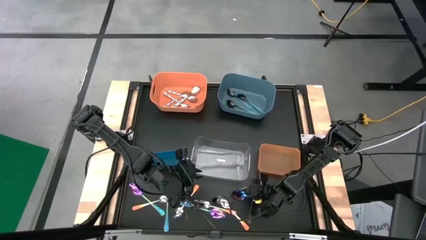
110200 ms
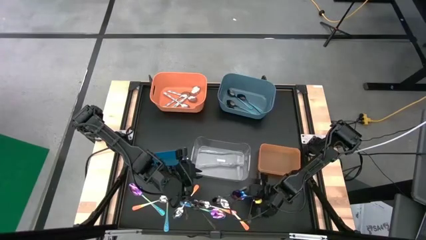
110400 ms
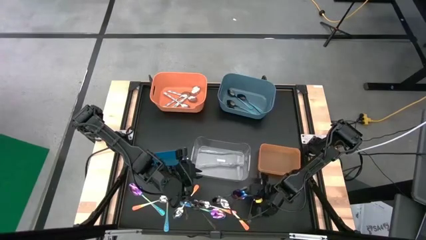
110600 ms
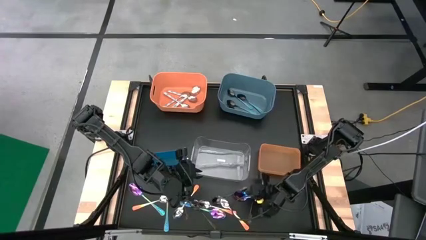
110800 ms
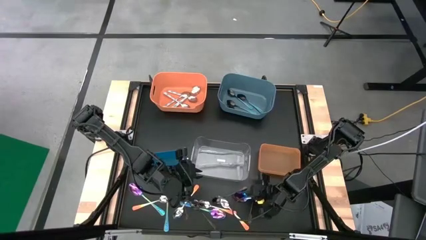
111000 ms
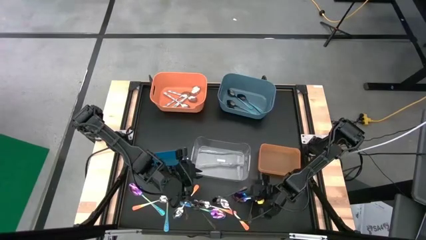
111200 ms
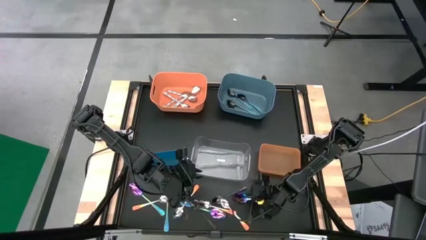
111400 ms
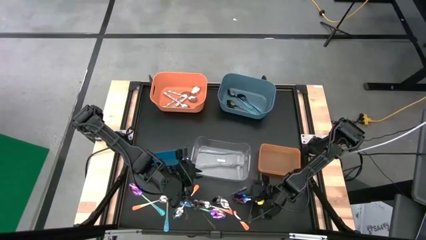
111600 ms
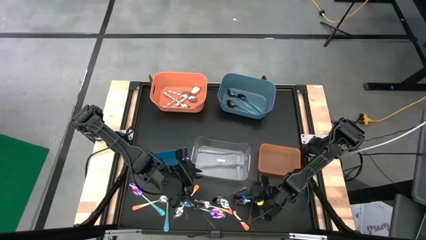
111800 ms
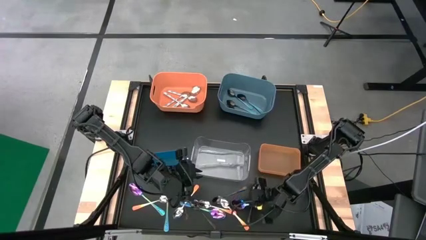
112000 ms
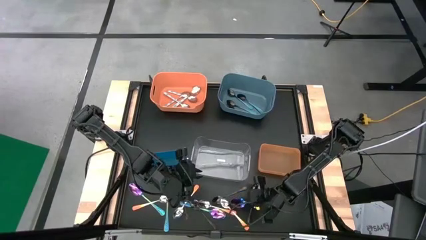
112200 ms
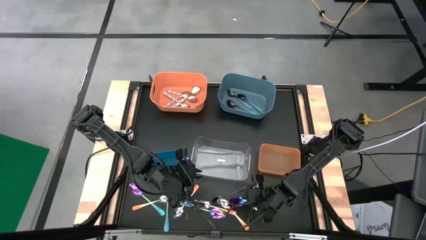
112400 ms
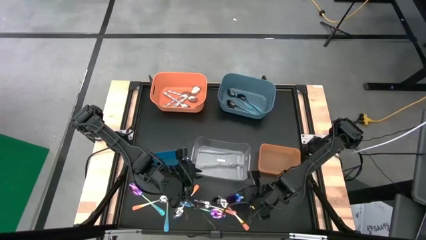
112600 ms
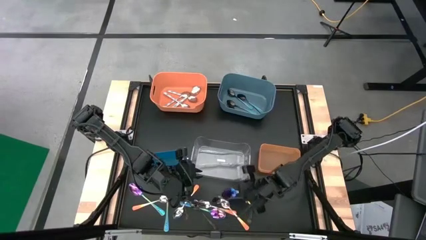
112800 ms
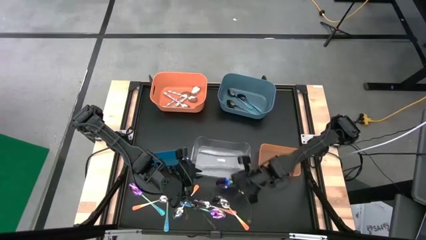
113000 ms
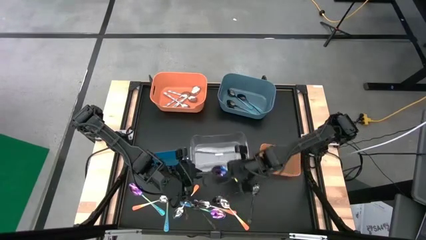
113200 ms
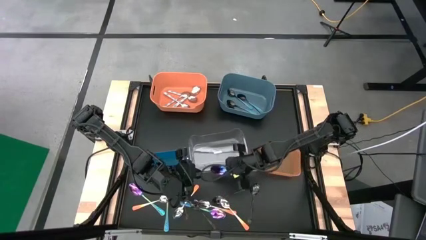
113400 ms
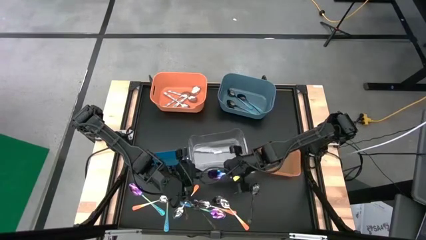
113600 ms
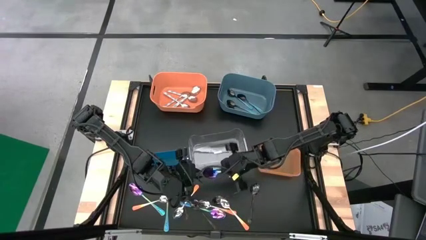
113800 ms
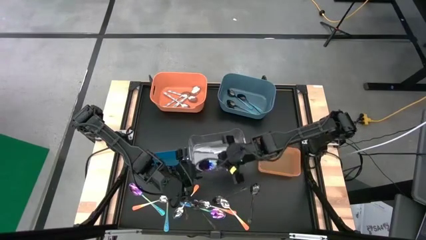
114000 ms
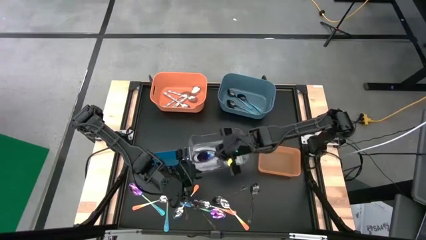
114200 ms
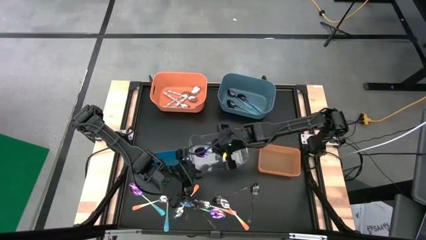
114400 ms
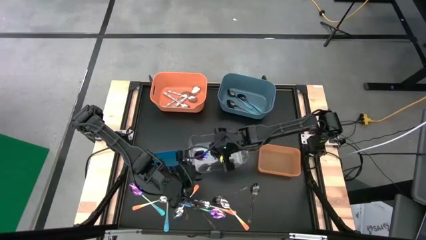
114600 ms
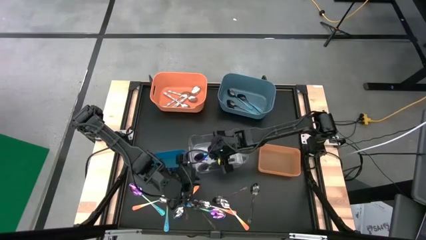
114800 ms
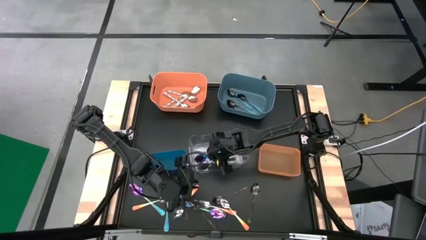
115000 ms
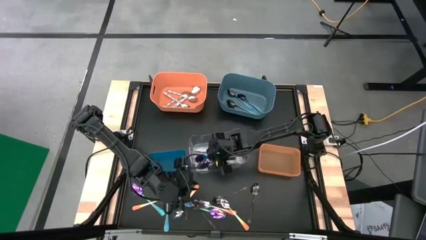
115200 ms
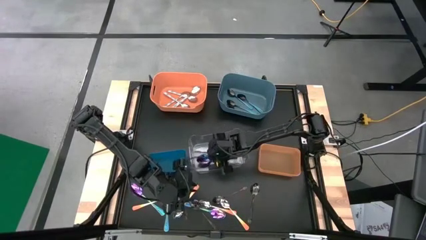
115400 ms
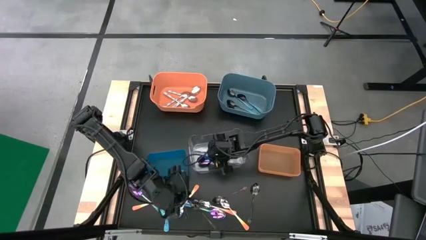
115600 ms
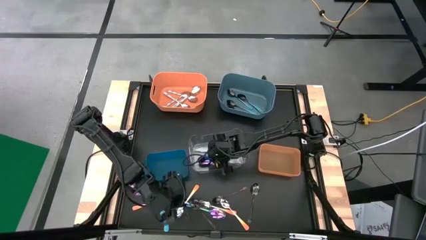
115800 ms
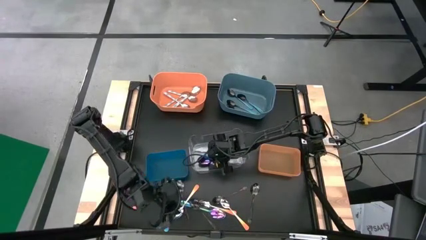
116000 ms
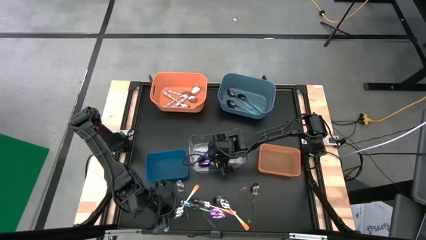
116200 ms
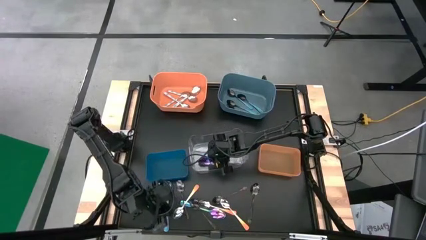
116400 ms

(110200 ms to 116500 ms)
Task: Sort silverware by color (type)
Put the purple spoon into the transparent bin

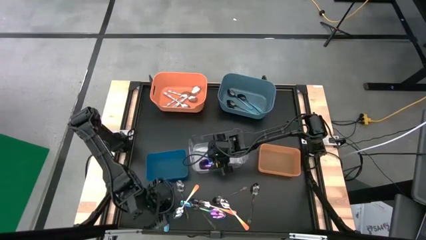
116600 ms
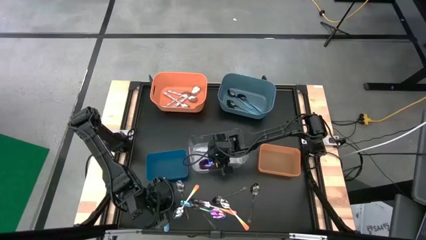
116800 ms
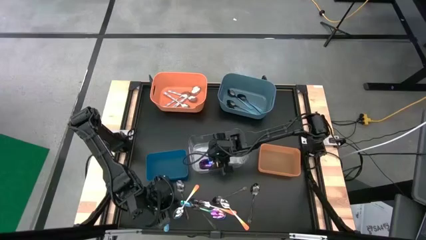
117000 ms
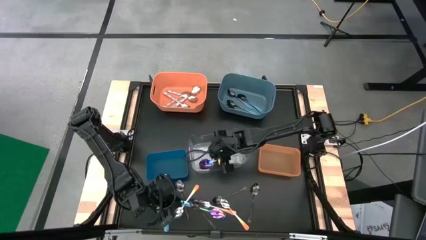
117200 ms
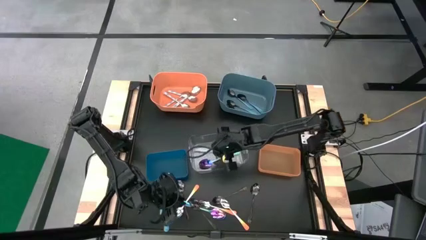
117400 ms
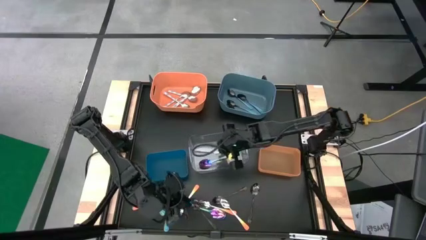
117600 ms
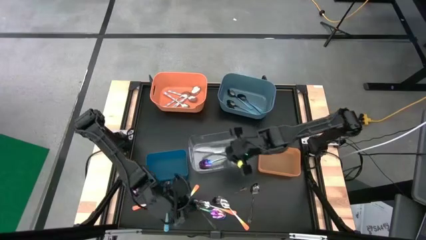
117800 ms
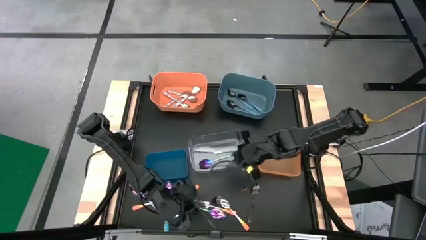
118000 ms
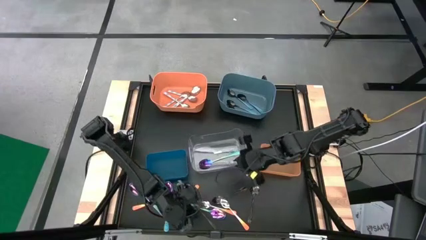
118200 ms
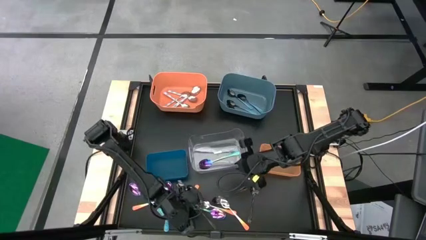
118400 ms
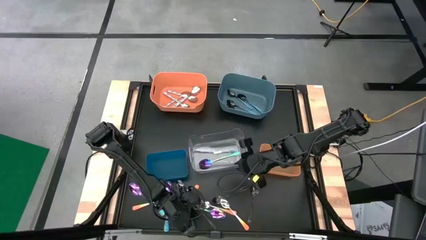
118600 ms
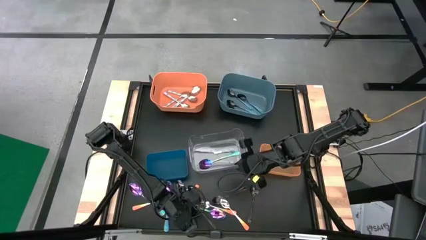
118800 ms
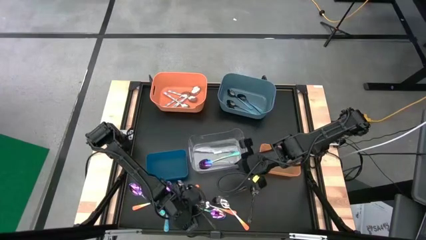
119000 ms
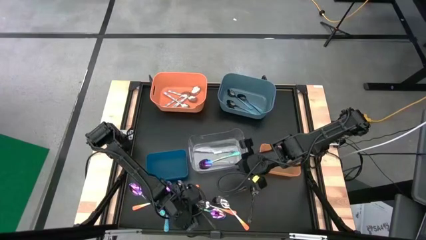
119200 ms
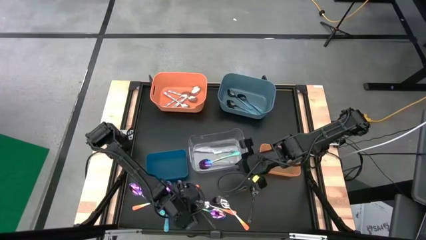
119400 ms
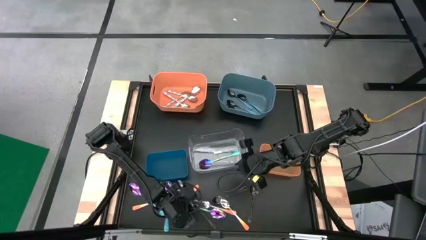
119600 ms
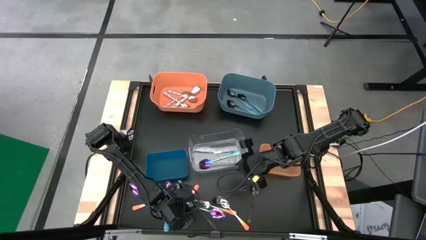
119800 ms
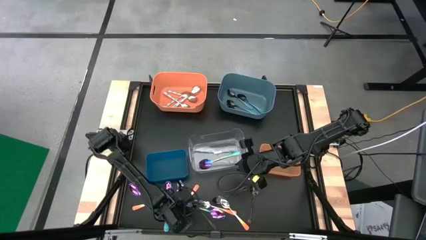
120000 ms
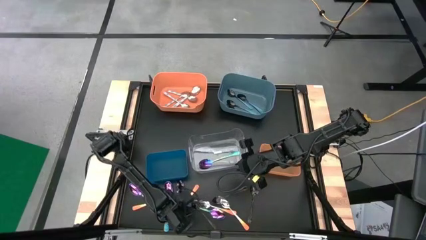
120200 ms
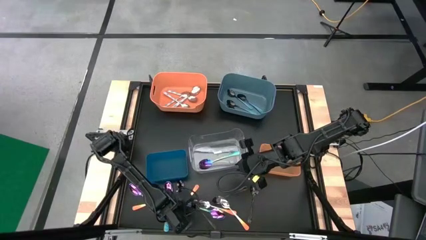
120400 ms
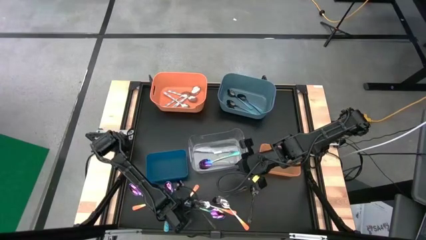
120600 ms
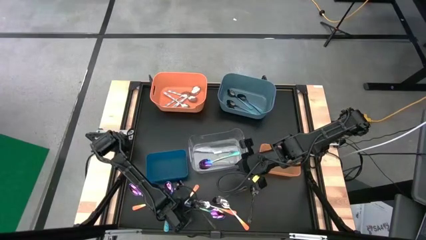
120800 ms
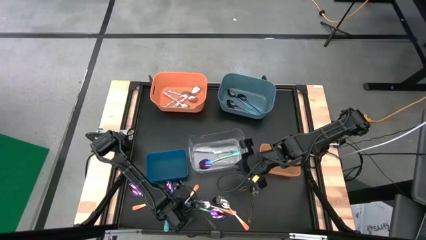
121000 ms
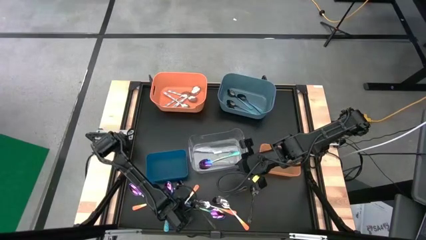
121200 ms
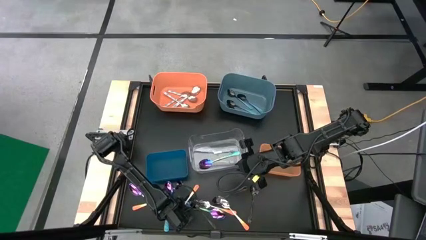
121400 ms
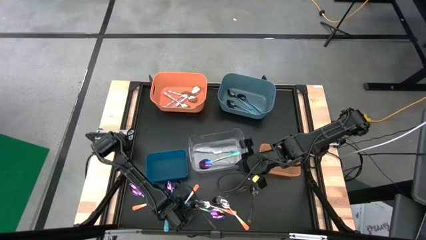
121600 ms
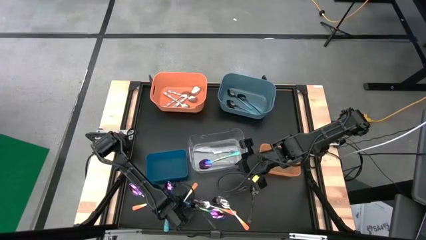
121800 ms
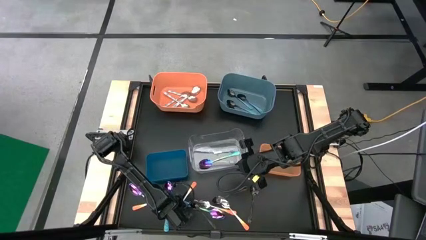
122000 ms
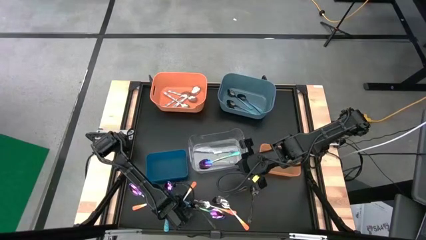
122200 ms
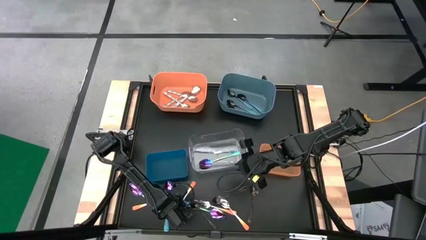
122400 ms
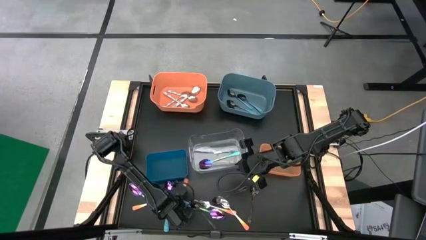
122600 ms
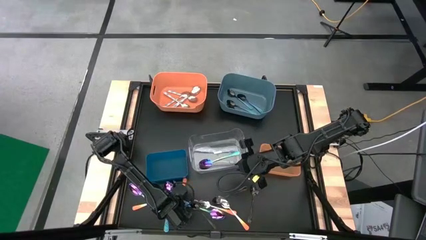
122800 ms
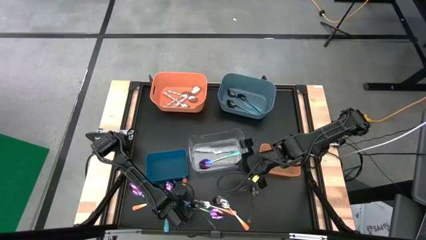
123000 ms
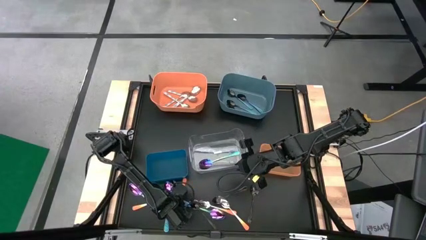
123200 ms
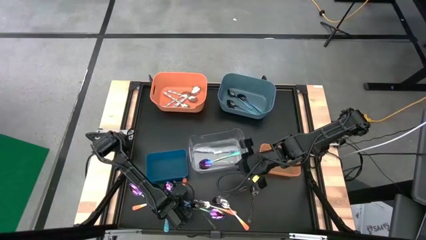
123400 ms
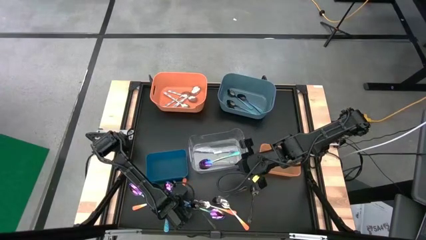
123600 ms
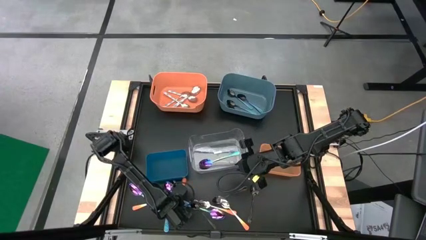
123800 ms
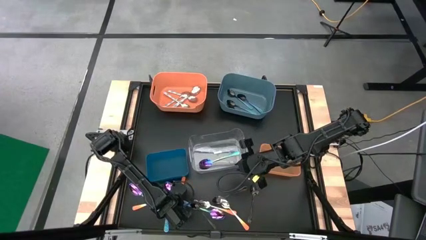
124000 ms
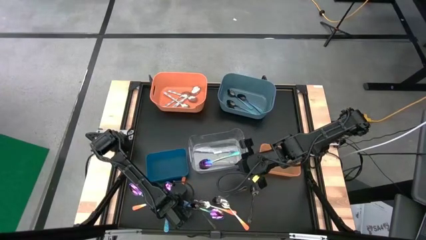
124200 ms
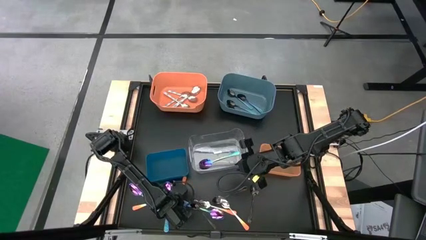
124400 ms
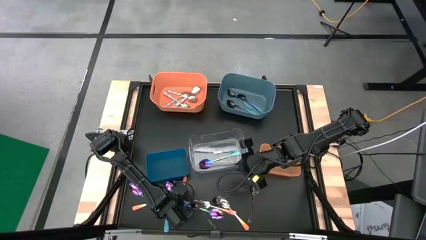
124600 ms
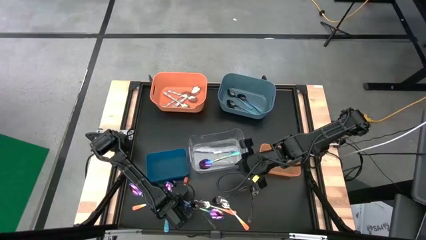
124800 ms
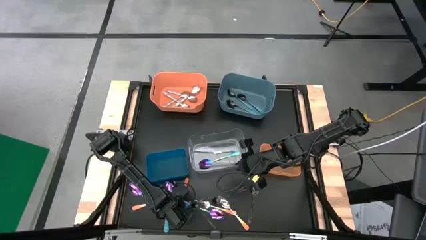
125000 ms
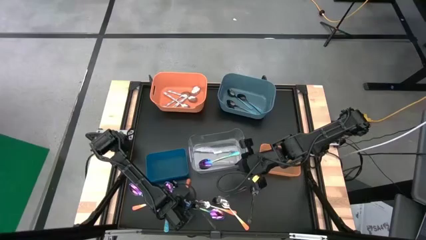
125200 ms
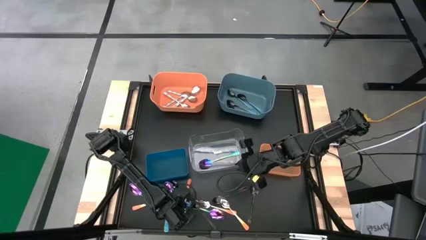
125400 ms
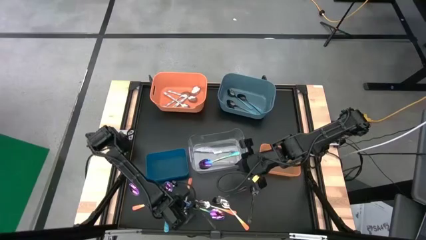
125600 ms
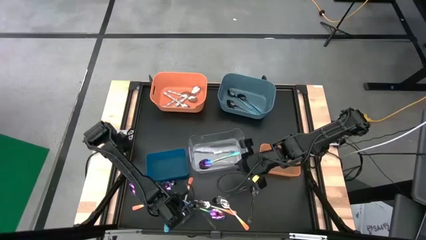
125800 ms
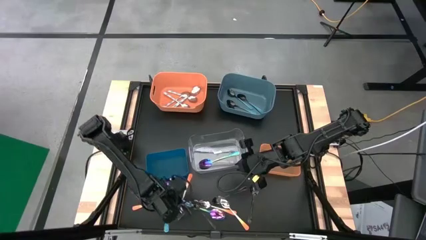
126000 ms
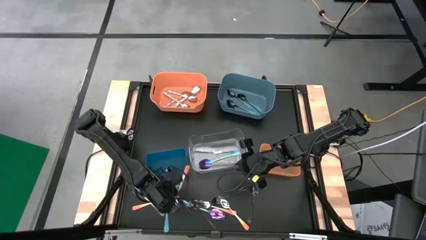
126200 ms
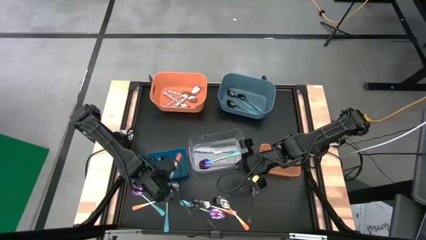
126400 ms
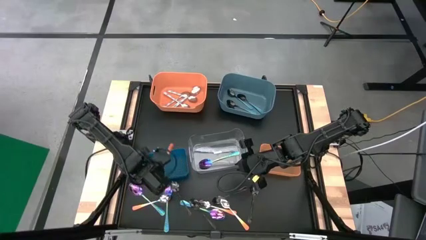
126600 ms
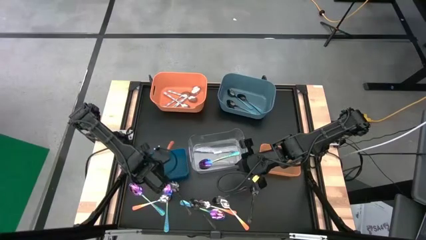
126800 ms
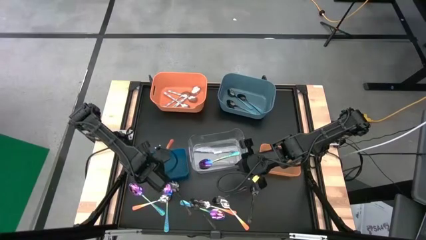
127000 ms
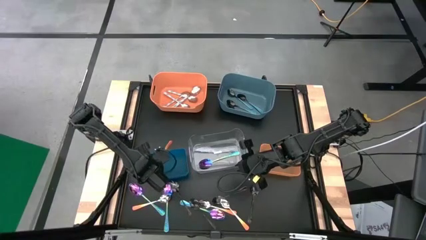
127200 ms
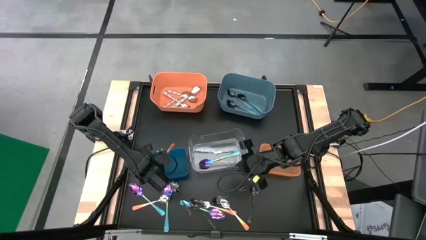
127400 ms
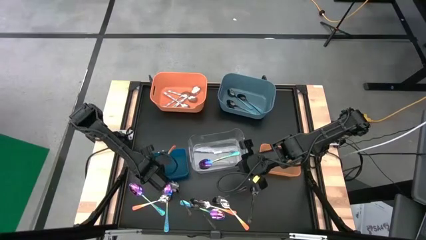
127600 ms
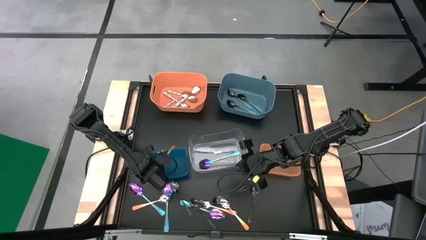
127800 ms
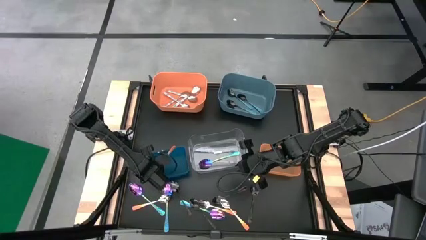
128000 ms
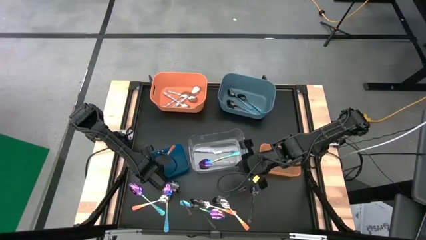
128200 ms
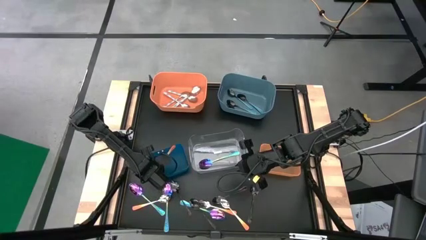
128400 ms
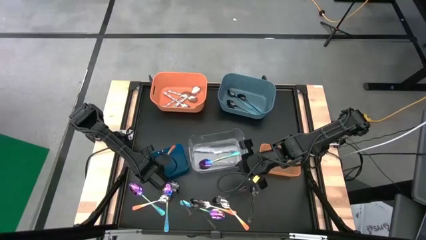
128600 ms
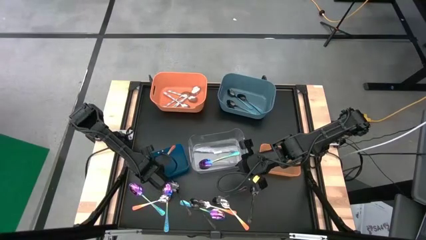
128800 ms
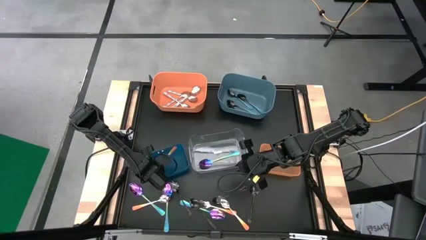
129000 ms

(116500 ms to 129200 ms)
Put the orange spoon into the blue bin
